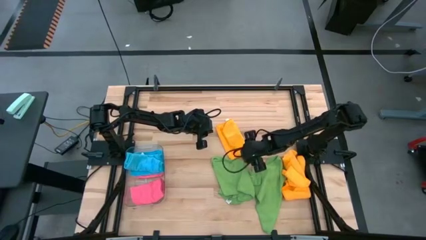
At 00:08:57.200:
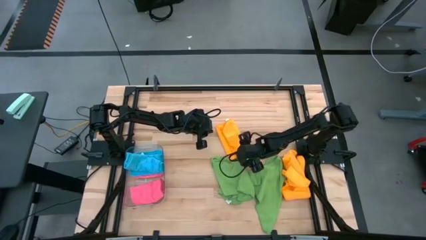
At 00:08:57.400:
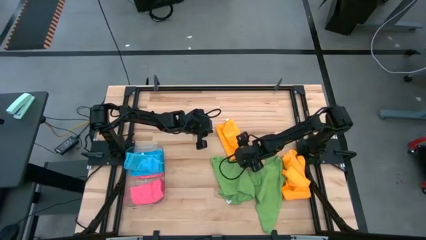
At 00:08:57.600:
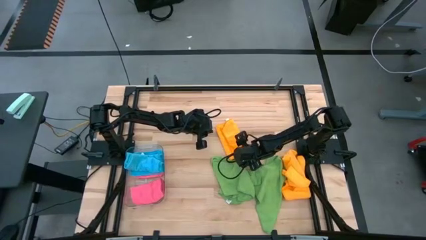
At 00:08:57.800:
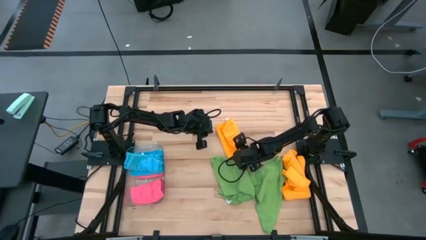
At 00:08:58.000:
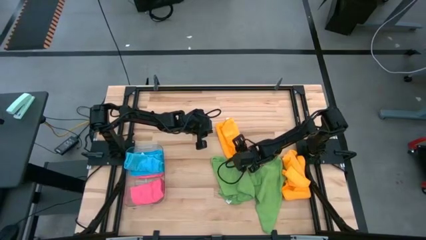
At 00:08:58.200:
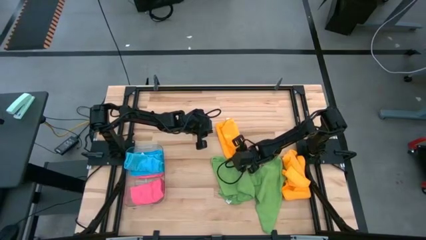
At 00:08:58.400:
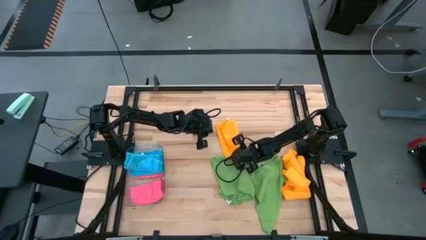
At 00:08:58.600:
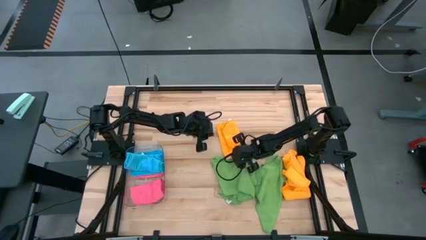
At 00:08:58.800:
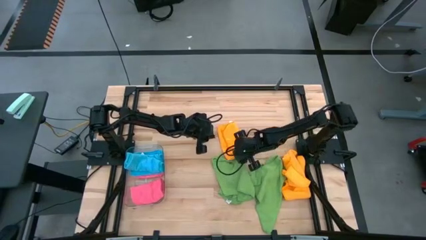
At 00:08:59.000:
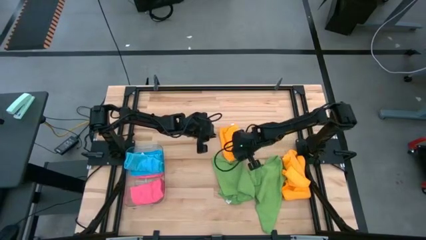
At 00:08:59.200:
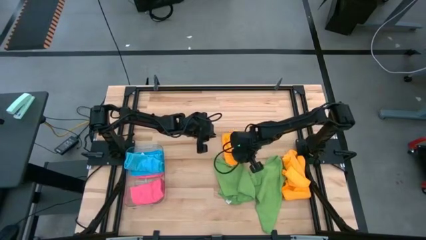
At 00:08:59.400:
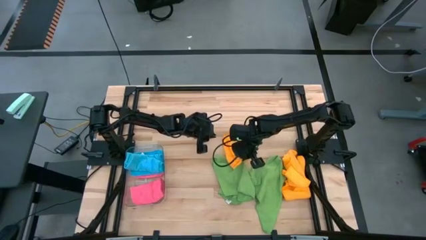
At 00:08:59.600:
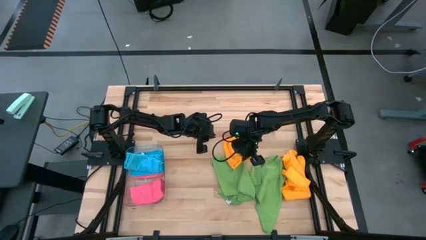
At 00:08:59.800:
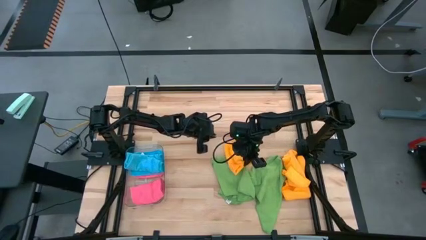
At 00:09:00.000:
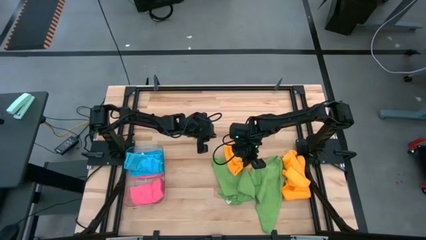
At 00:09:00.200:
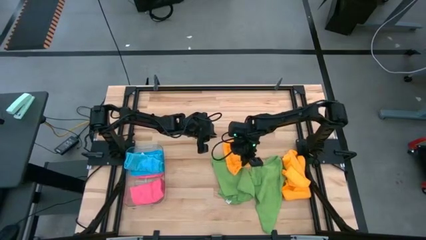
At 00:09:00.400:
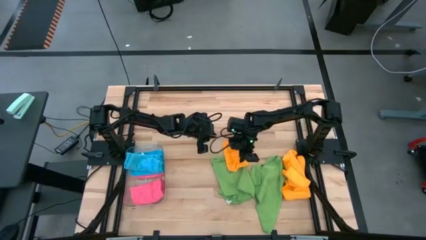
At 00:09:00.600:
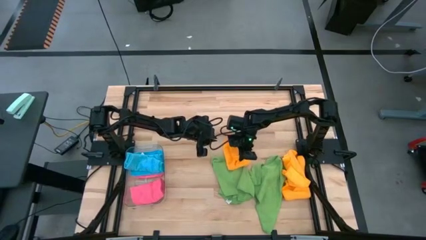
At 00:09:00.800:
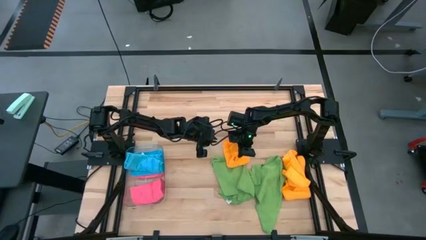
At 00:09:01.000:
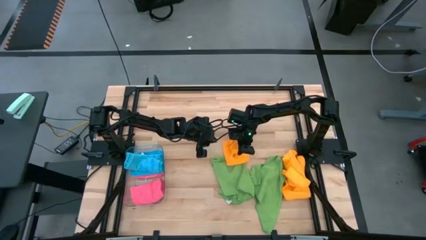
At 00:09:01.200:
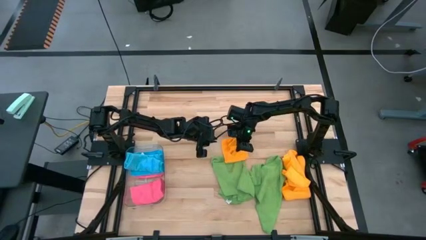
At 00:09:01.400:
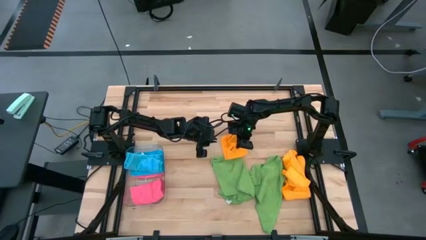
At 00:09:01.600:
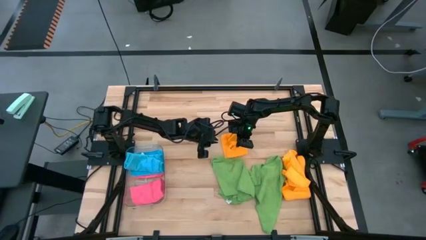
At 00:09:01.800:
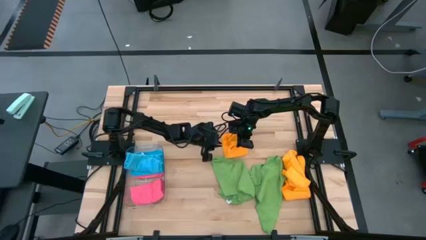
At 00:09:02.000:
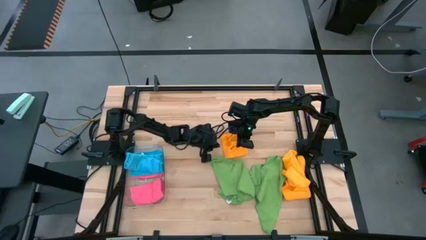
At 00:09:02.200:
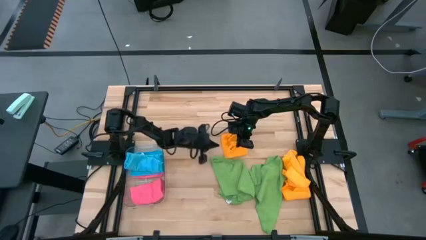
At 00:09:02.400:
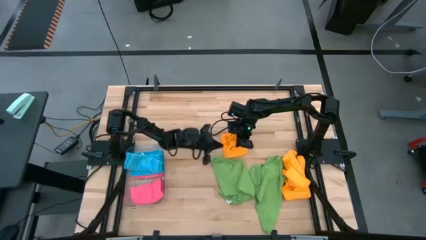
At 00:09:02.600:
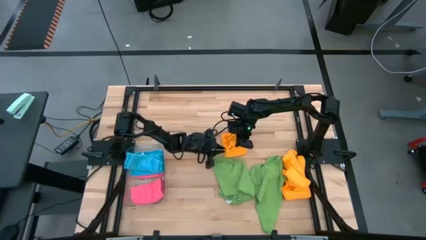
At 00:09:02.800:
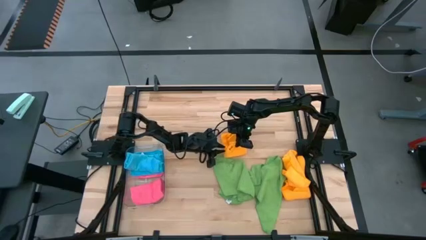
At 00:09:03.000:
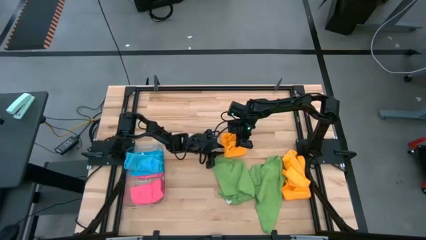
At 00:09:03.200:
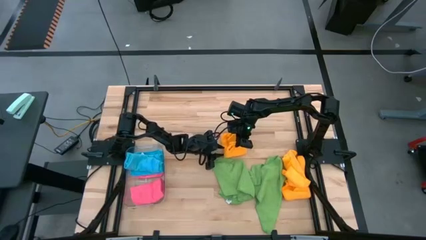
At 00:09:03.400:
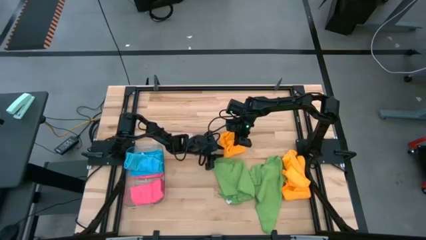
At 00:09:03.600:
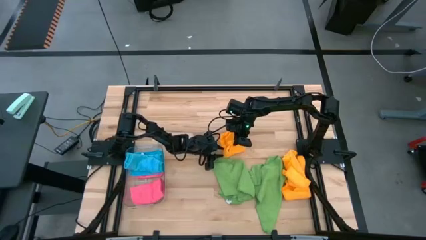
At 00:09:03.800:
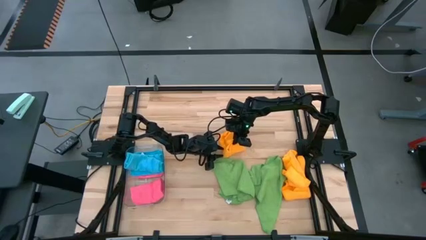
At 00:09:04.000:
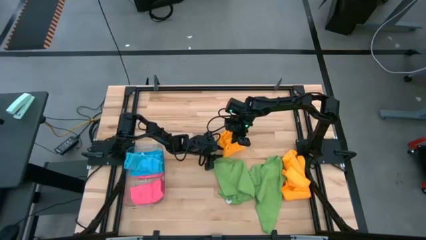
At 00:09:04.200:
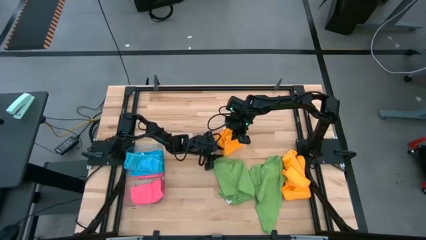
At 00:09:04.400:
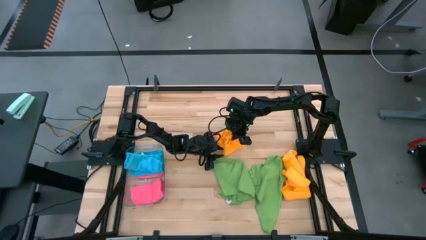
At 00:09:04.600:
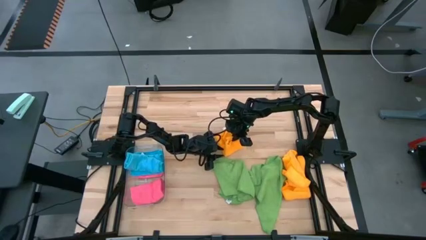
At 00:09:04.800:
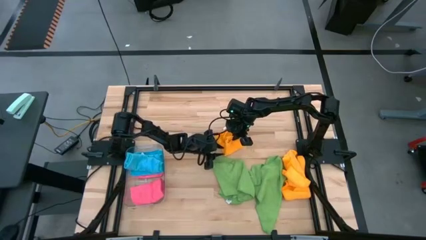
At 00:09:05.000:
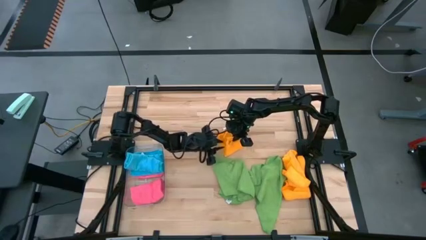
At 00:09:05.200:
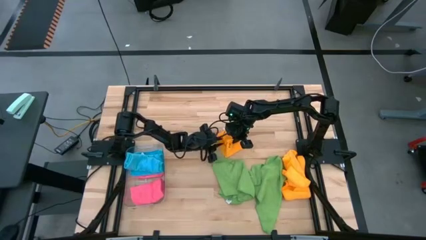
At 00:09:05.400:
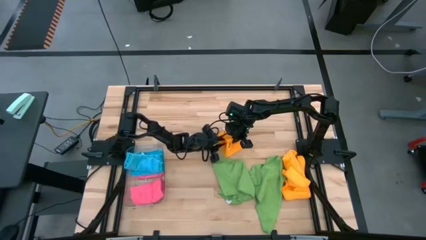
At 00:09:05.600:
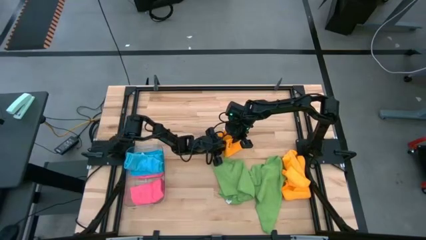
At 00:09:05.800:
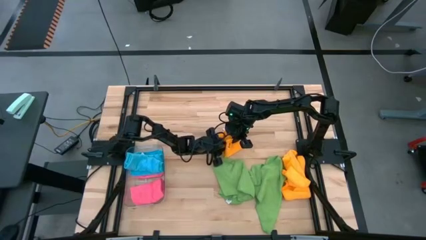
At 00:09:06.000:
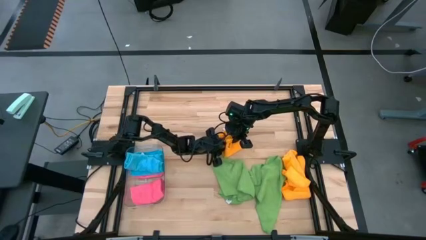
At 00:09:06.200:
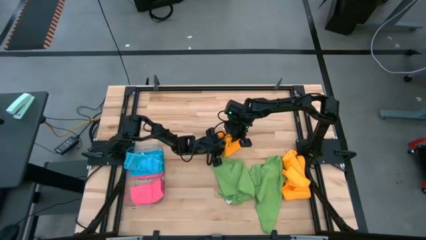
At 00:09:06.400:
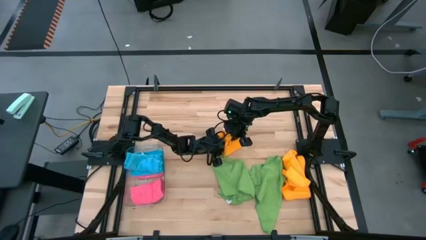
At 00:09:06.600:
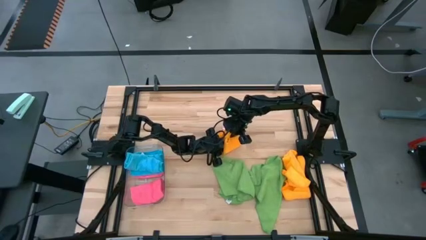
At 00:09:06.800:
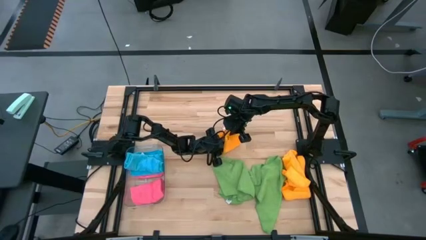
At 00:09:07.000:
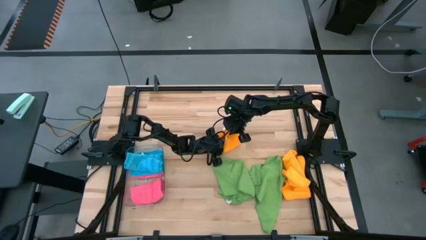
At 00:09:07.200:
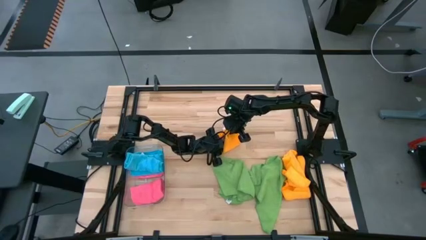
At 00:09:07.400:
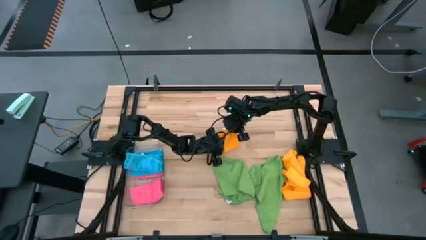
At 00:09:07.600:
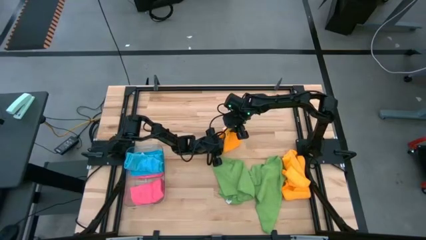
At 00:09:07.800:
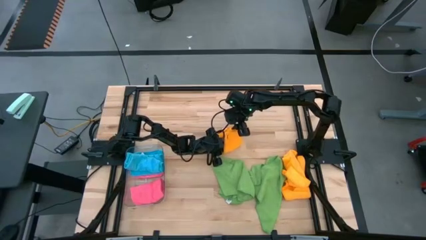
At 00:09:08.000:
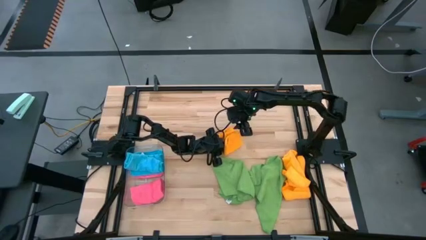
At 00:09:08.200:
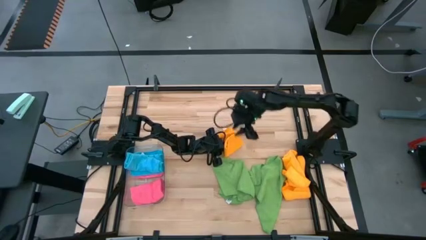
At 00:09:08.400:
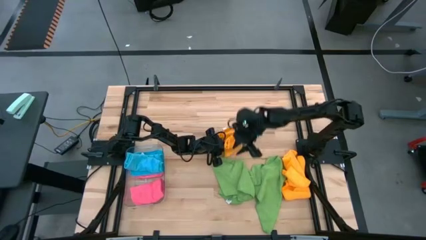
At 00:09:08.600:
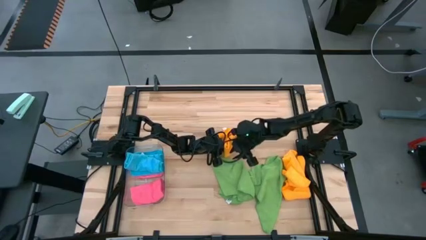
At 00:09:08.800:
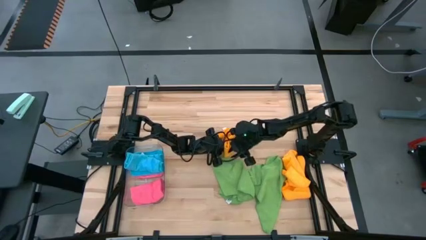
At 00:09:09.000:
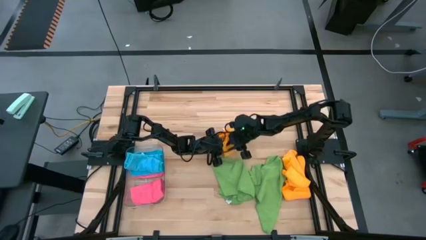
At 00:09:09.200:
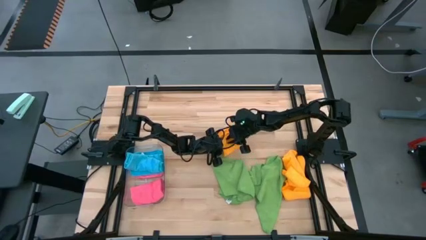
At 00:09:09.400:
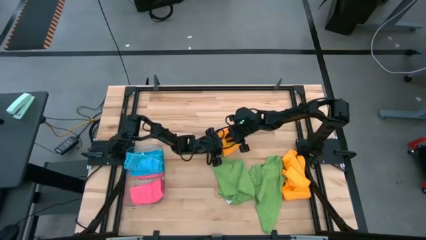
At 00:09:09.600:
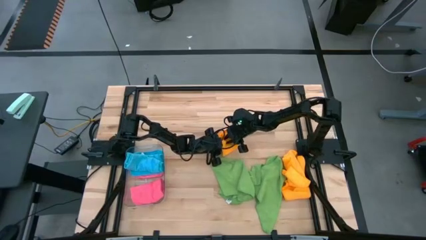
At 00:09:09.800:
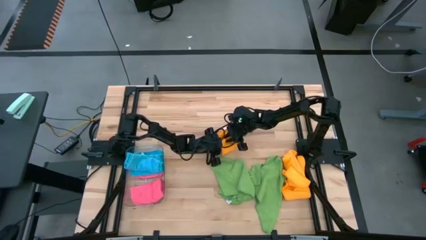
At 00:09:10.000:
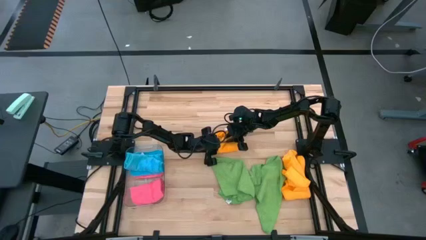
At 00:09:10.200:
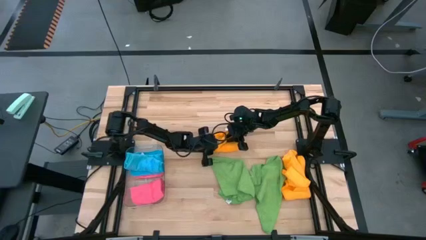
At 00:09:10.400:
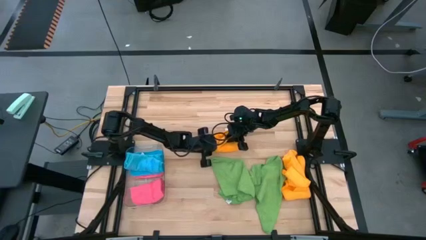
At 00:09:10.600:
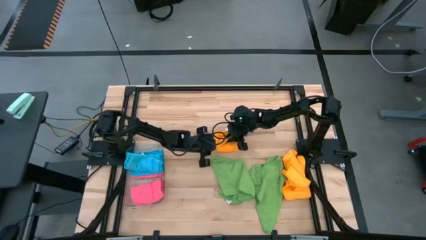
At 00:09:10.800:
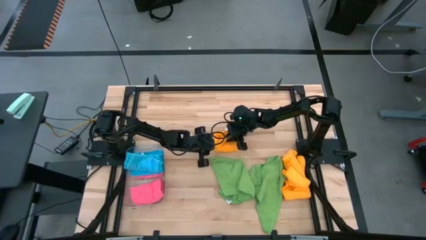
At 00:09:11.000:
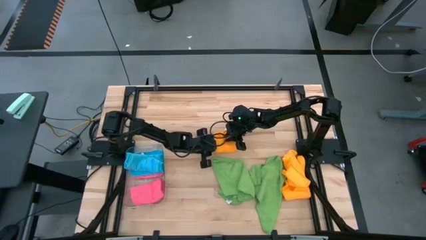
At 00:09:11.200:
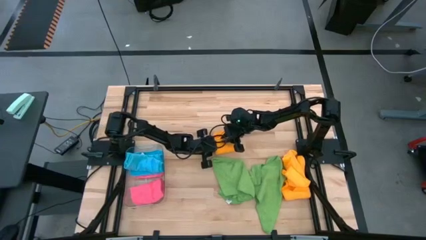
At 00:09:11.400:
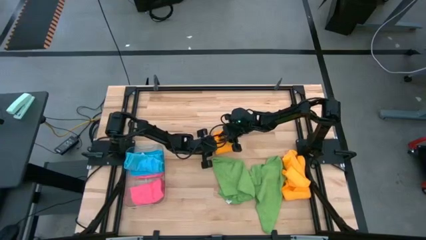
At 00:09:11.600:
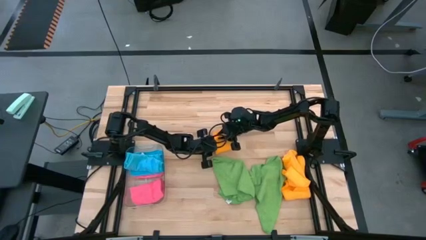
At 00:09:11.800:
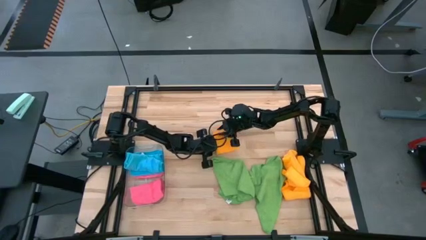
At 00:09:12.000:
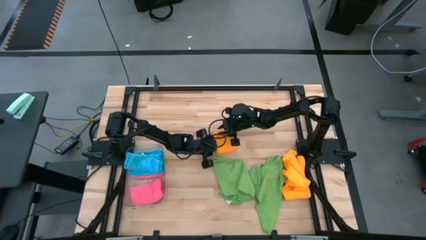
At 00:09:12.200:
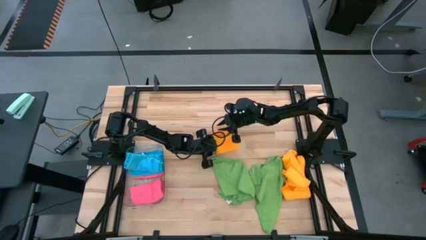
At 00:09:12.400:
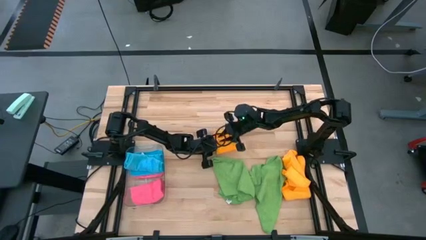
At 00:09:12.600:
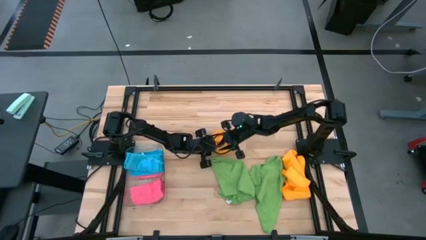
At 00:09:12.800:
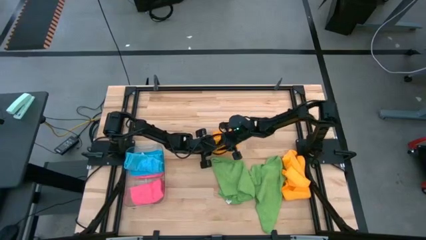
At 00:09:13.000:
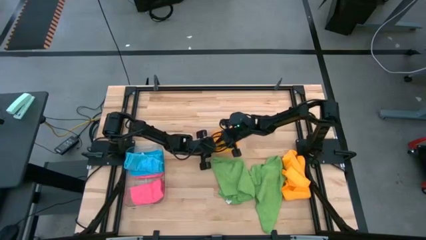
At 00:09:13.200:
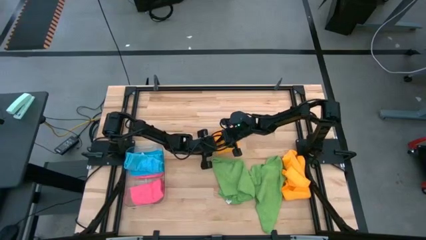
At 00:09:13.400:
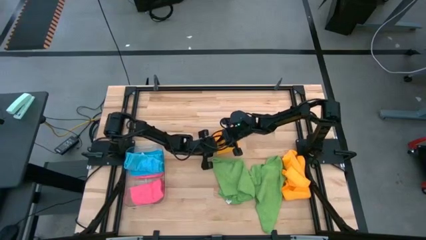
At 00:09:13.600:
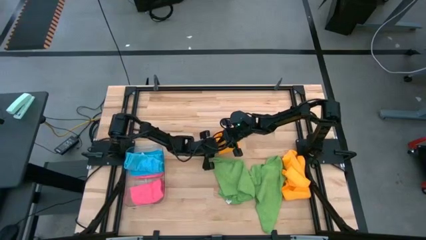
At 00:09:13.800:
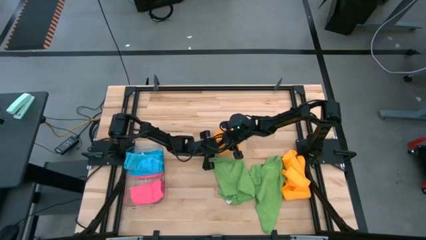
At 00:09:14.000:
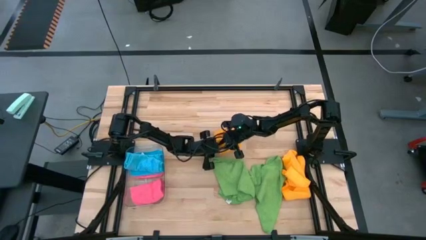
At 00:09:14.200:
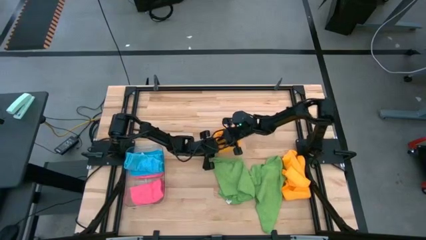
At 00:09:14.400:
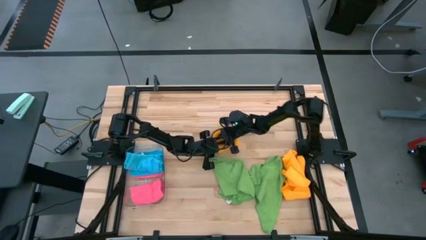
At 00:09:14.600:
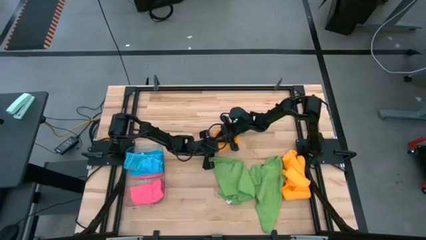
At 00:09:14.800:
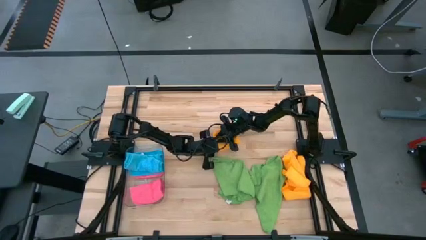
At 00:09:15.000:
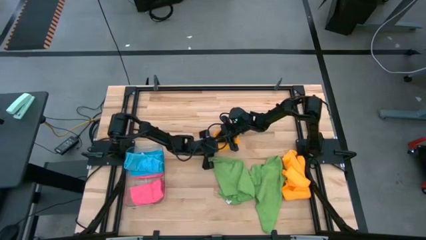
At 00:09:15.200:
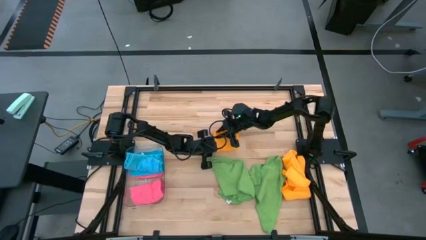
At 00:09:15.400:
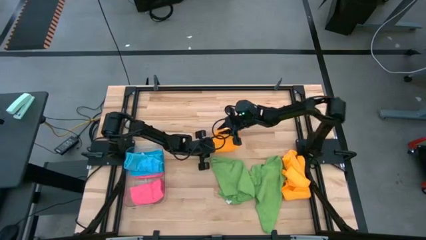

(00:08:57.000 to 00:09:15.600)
Task: Fold microfiber towels
Fold the left yellow microfiber cloth
